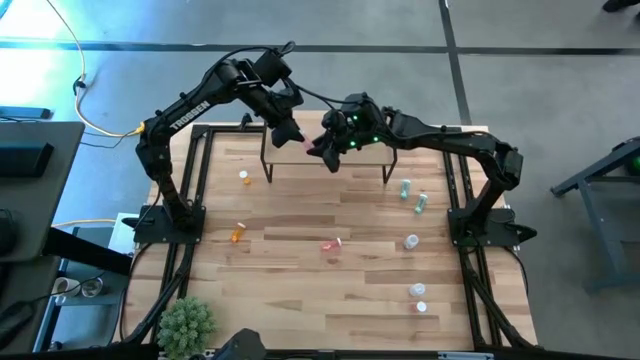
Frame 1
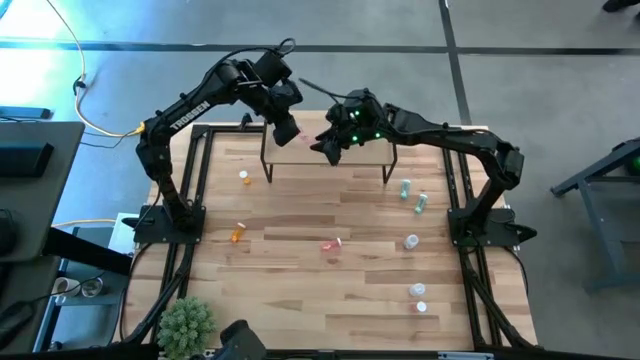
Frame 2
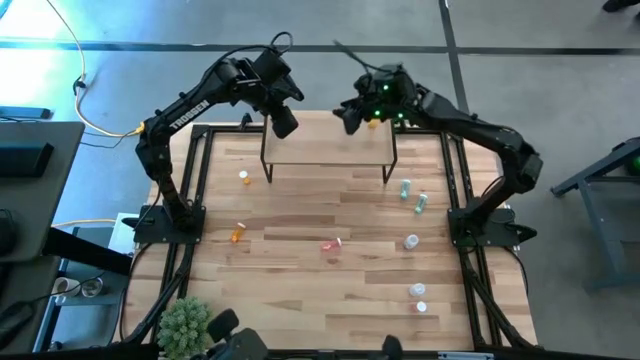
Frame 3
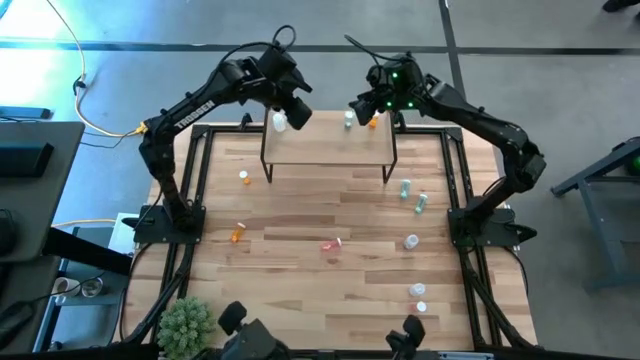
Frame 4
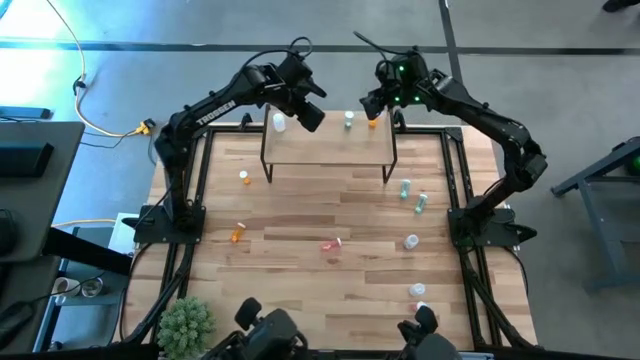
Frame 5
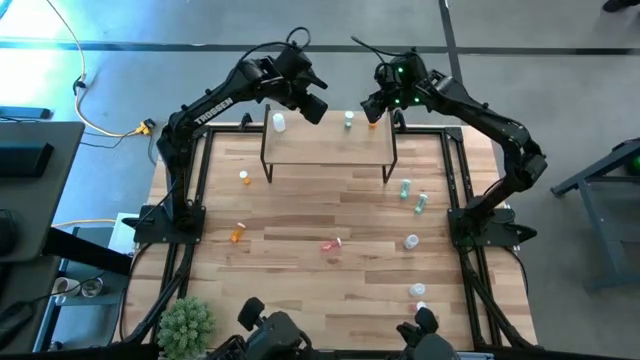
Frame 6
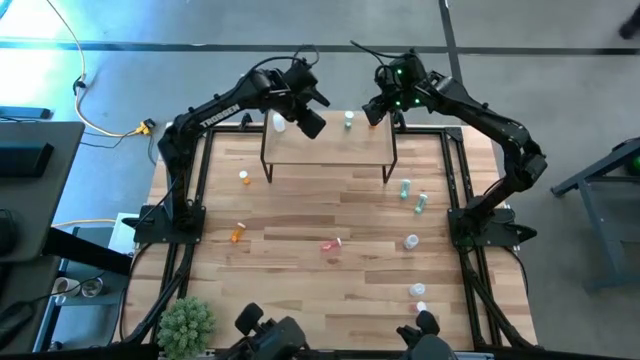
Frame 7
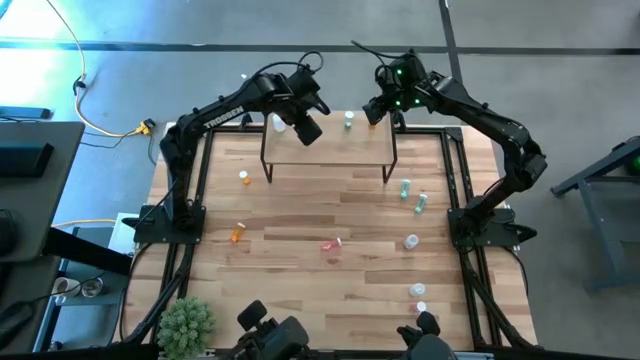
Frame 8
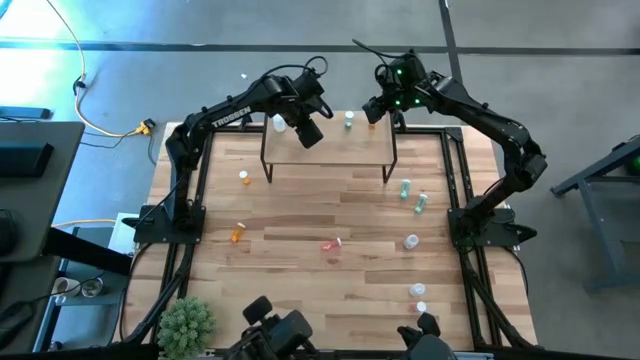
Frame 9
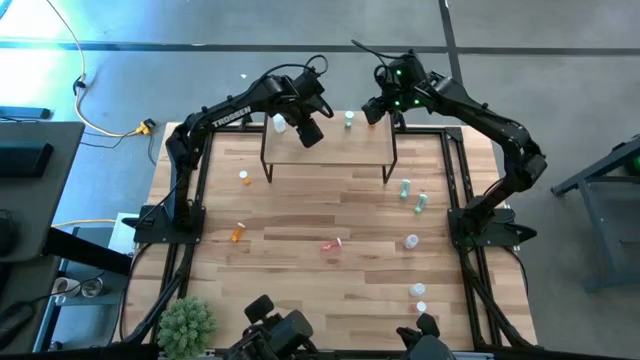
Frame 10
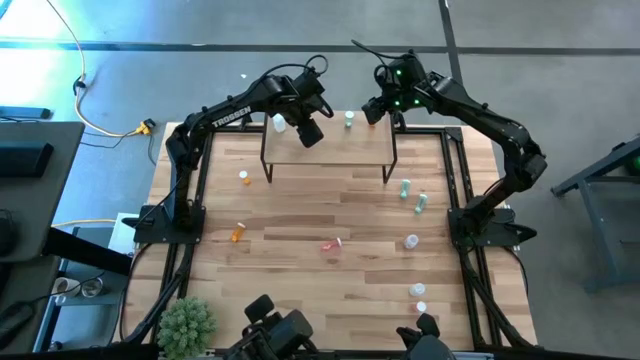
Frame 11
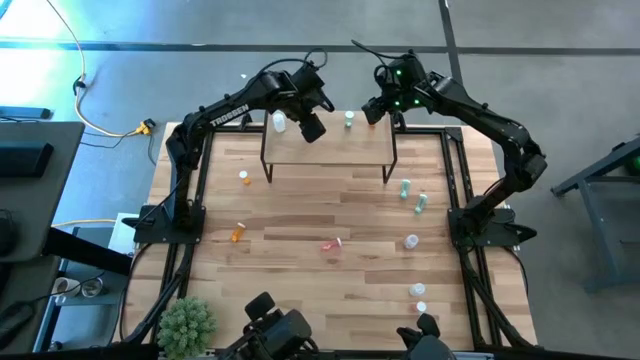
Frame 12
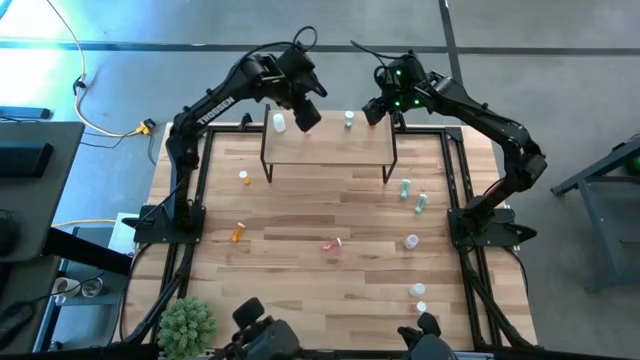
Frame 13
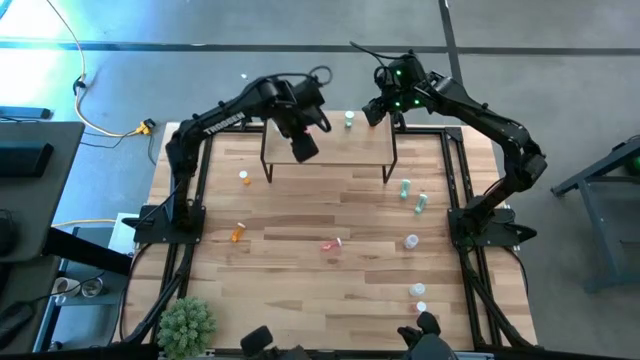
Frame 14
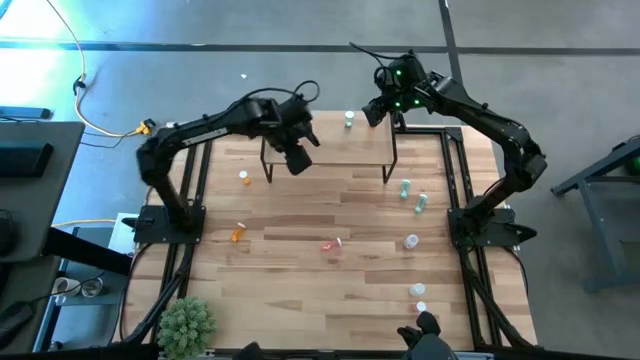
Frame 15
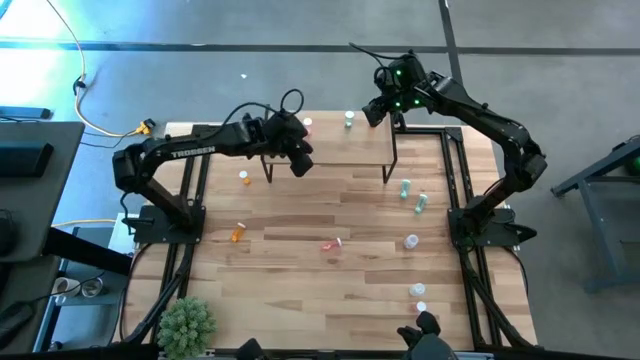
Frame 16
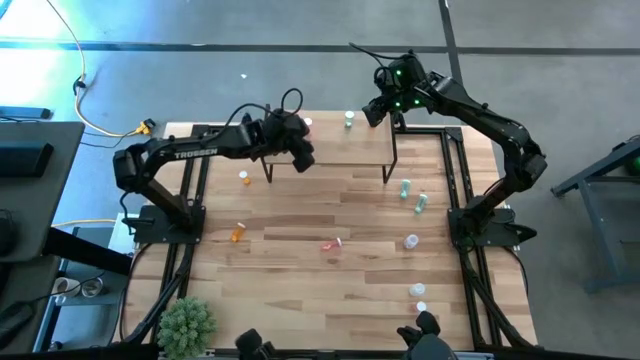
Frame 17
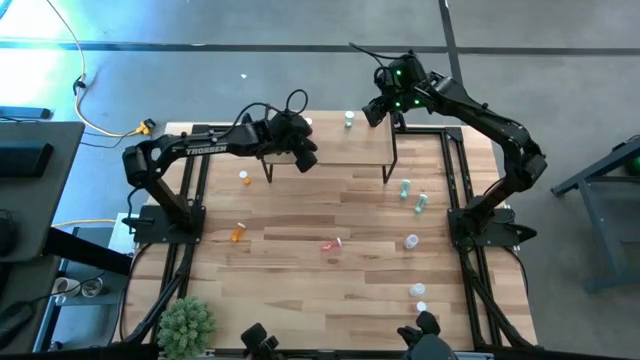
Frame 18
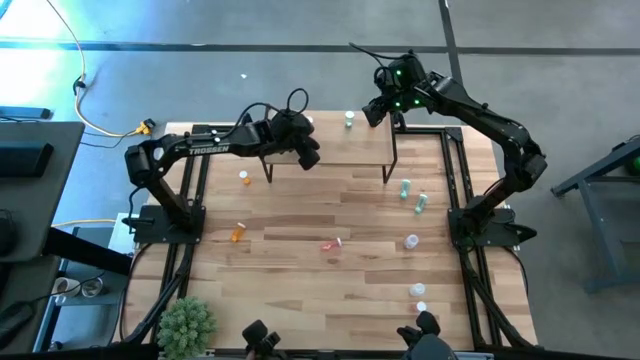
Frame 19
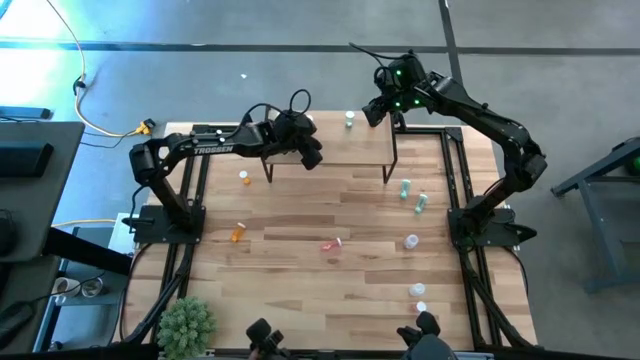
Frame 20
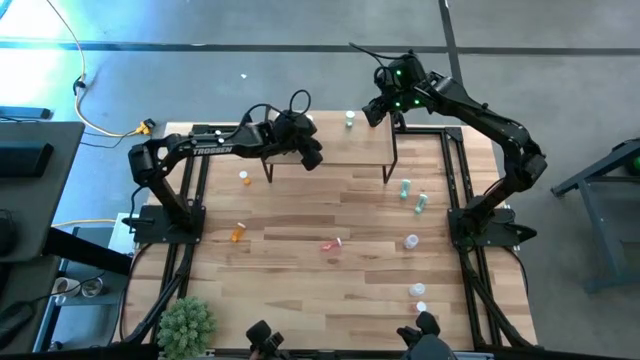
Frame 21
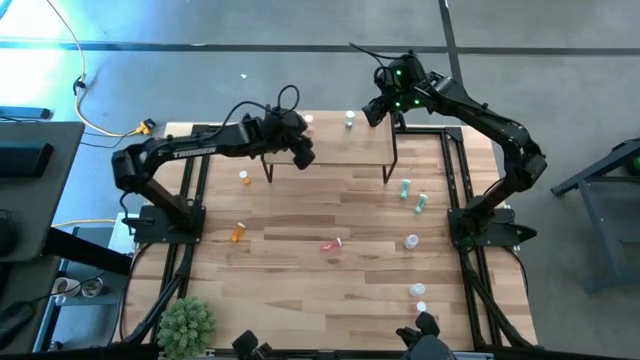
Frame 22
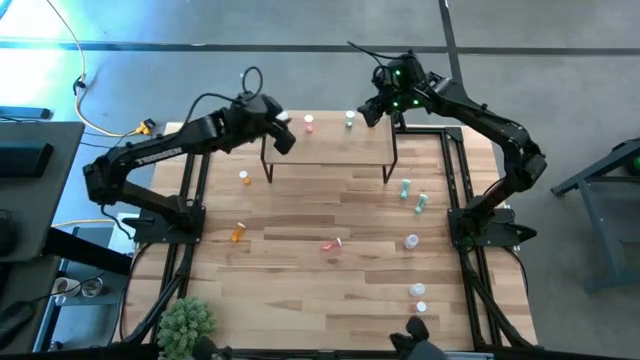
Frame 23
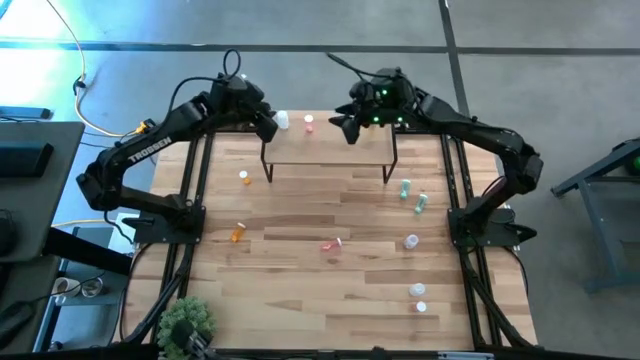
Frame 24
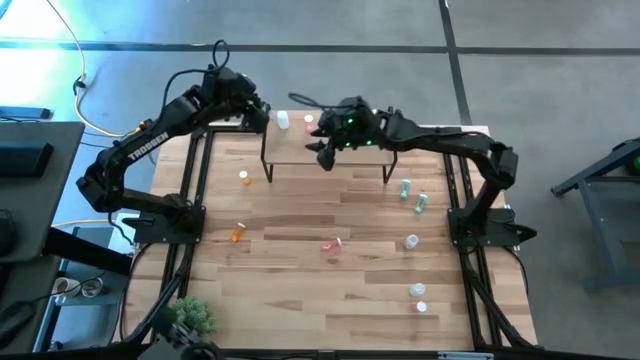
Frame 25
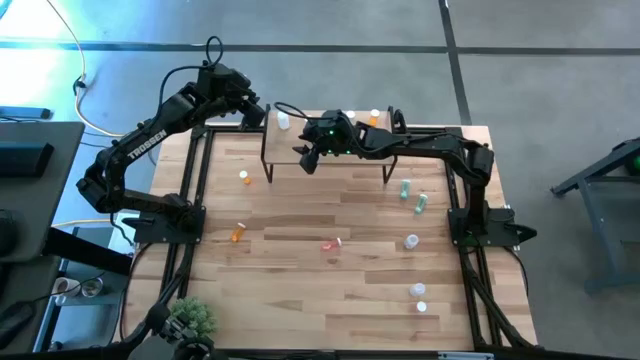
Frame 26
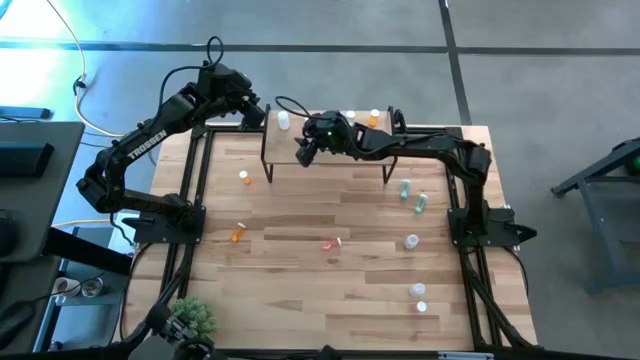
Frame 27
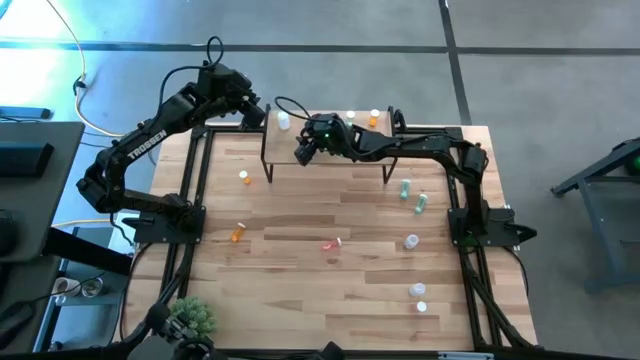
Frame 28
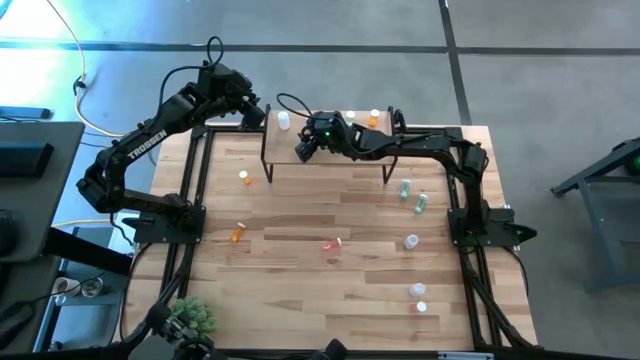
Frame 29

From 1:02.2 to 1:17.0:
Task: Pick and place medicine bottles onto shelf by color
Put the top pink pill bottle on the shelf

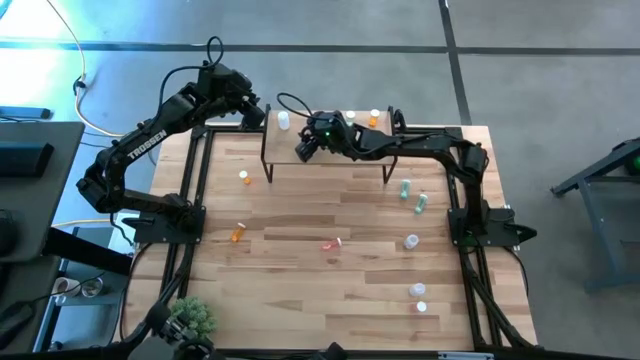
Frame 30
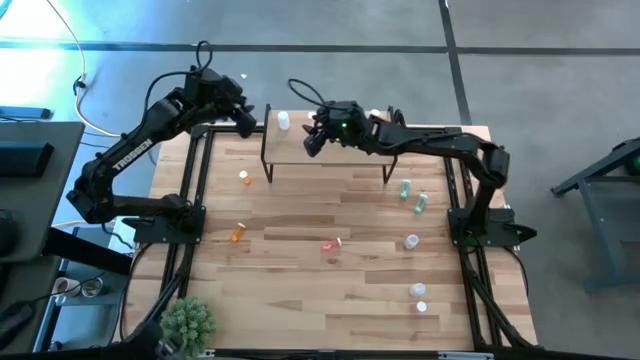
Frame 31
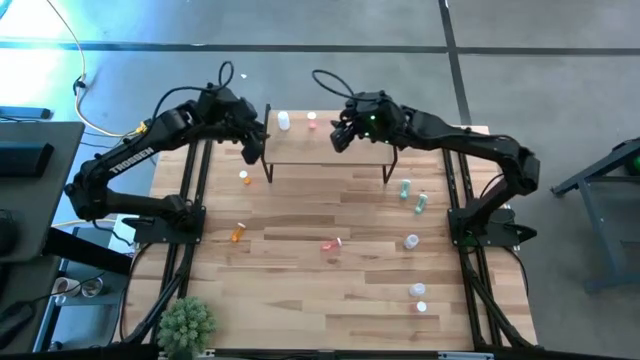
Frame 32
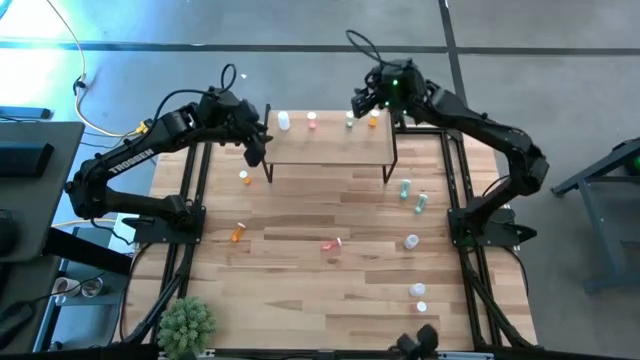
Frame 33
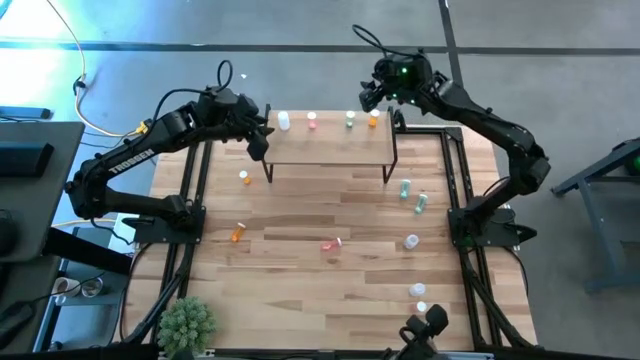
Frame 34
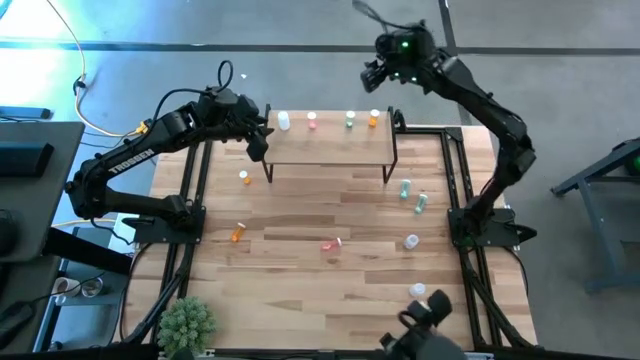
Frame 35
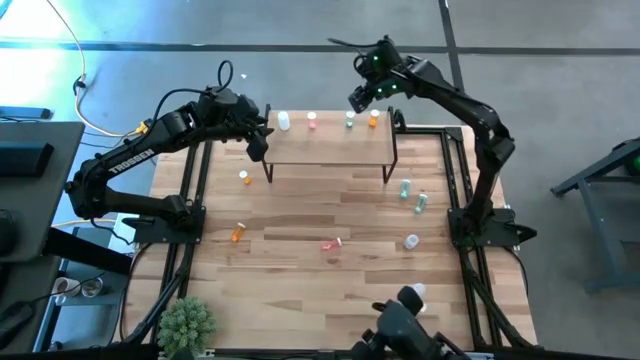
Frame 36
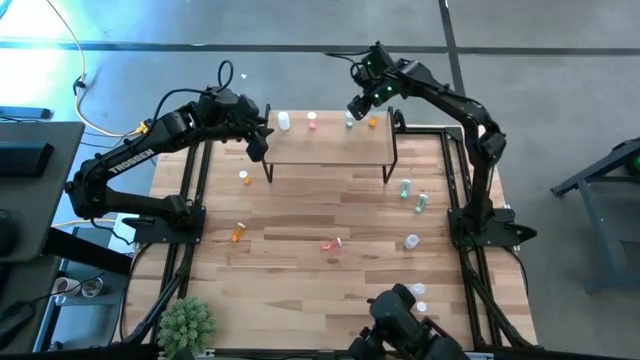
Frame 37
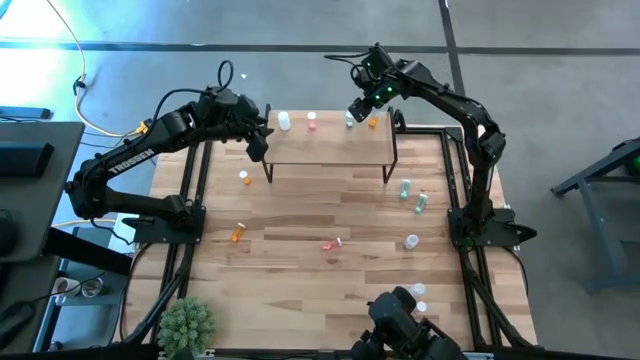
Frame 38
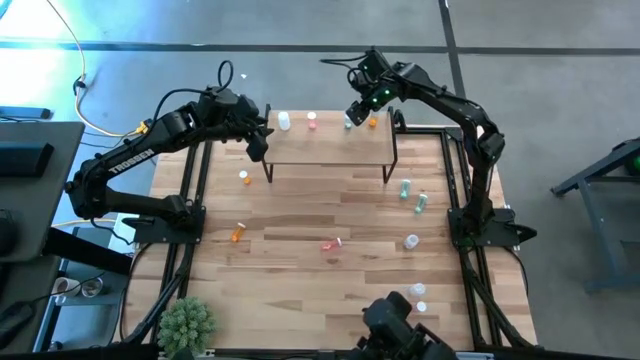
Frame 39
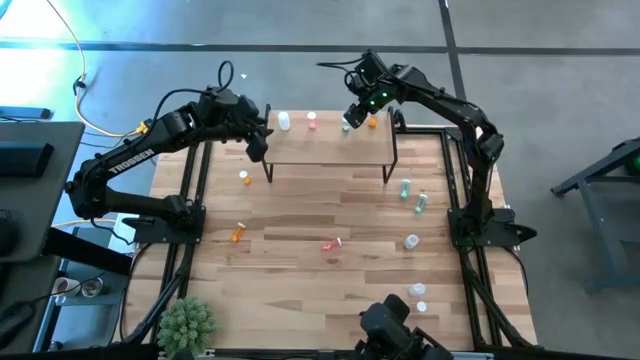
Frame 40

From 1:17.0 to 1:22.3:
Adjust the blue pill bottle on the shelf

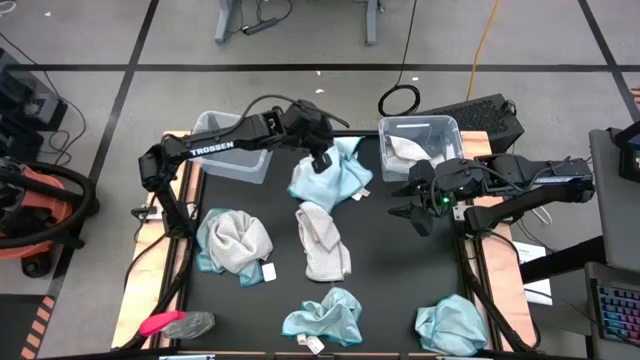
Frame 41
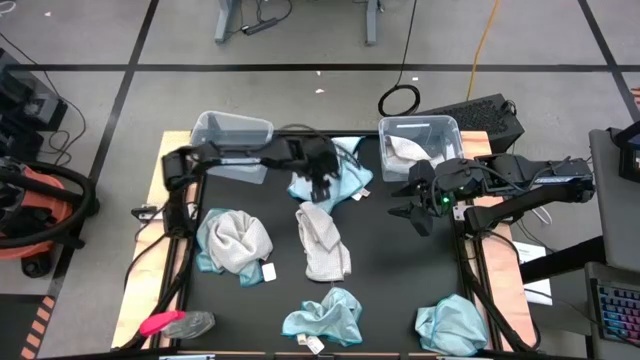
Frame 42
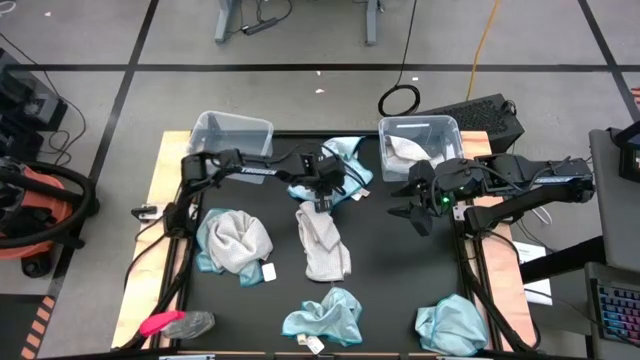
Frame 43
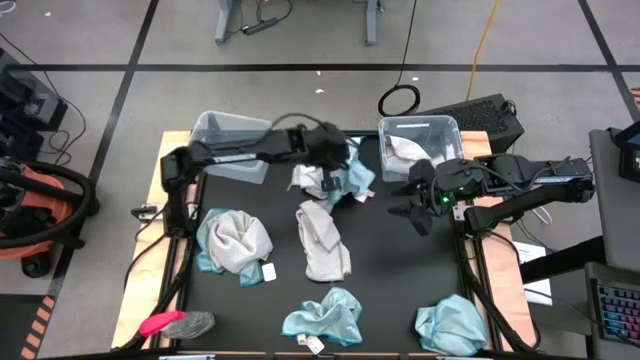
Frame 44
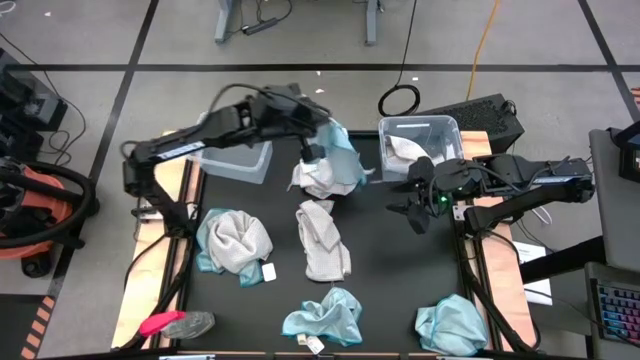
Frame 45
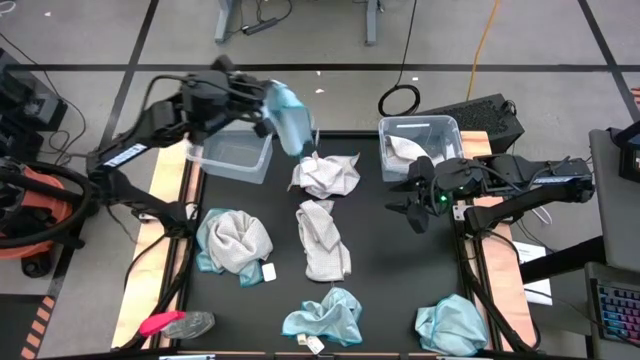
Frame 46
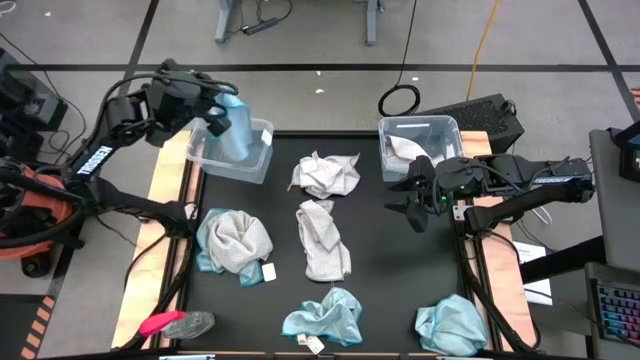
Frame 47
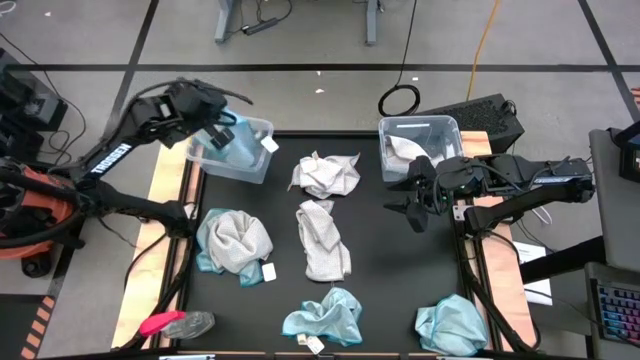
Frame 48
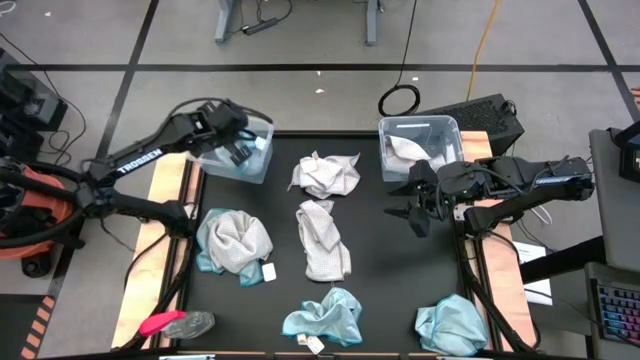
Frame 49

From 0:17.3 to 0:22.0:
Task: Sort microfiber towel by color & place in baskets
Put the blue microfiber towel into the left transparent bin
